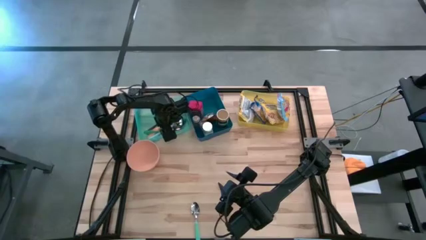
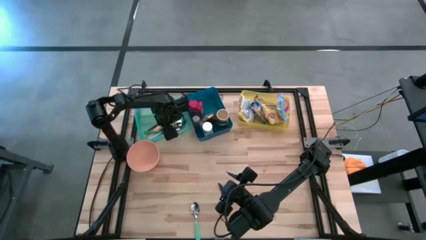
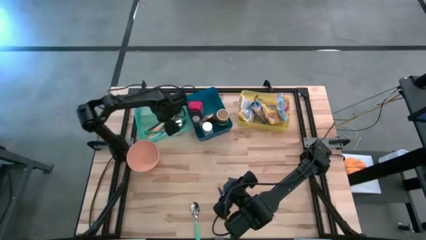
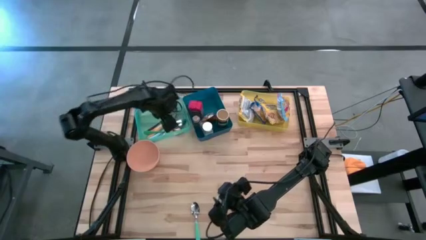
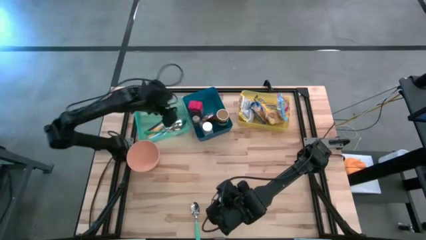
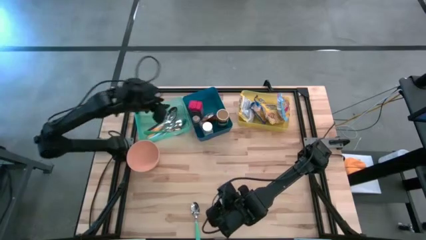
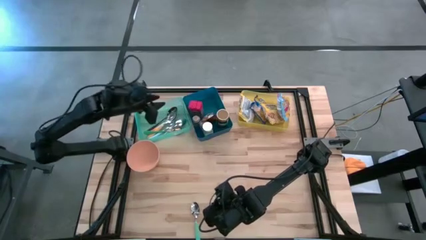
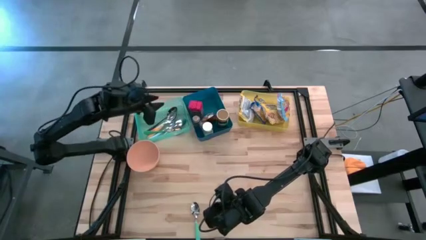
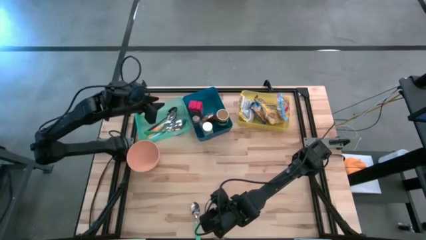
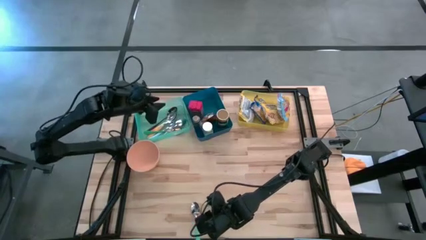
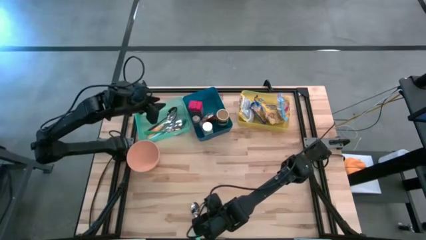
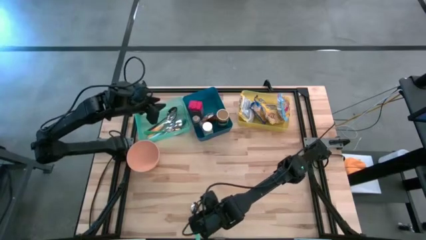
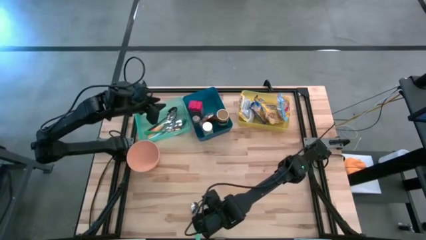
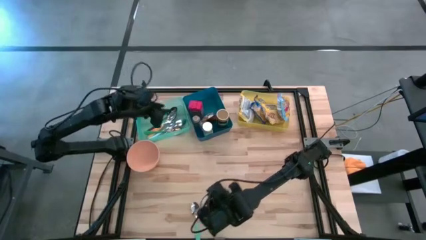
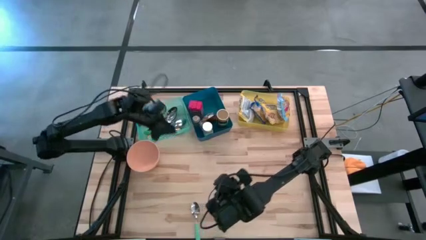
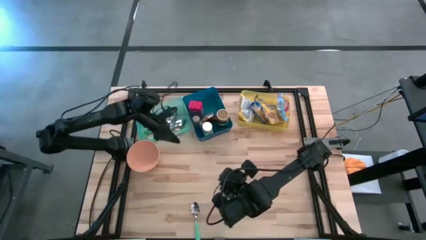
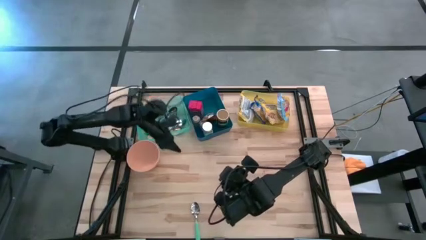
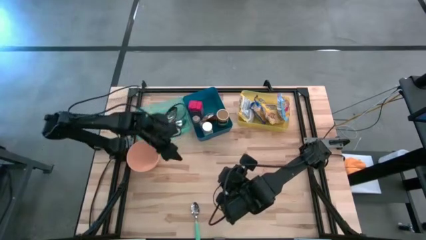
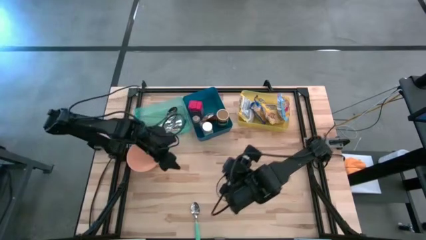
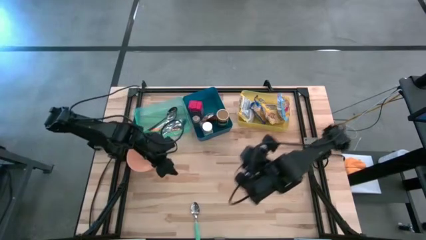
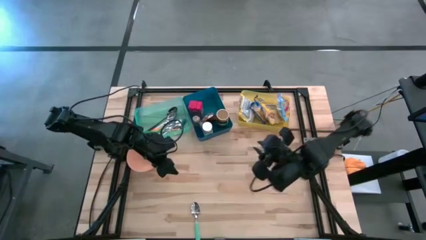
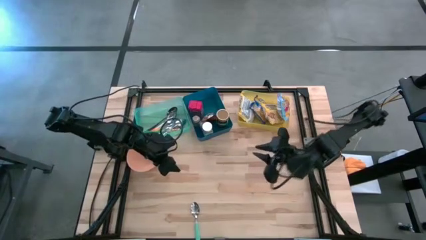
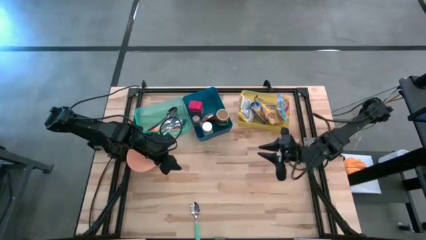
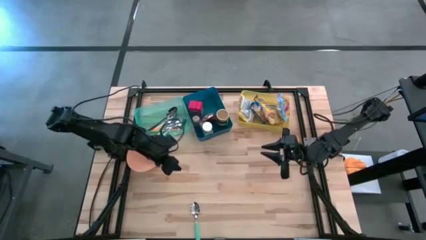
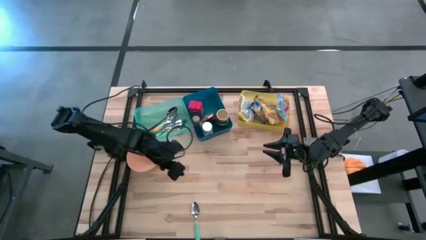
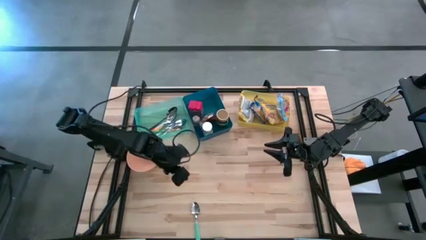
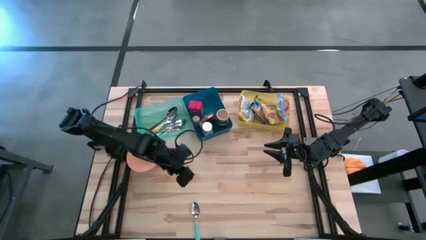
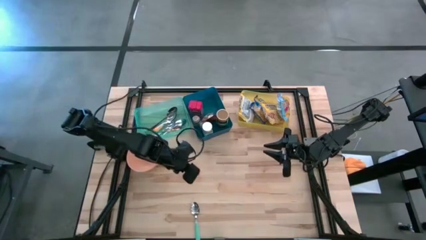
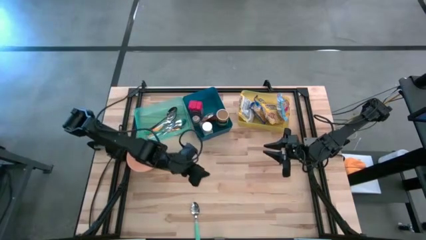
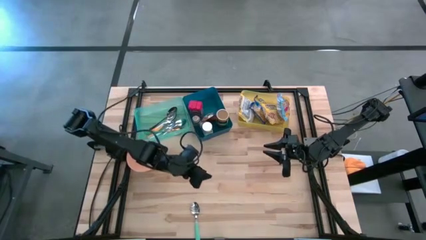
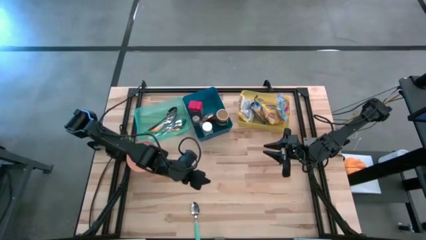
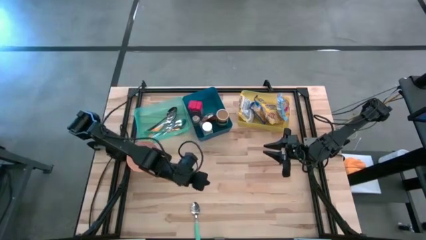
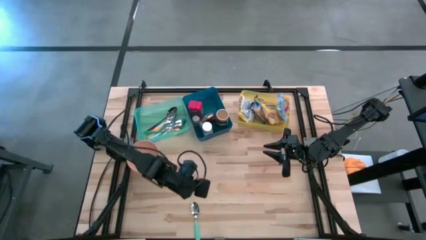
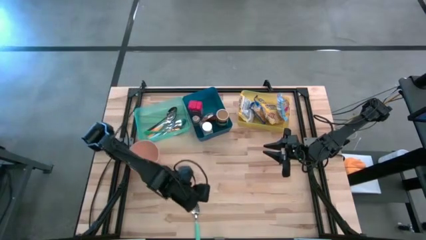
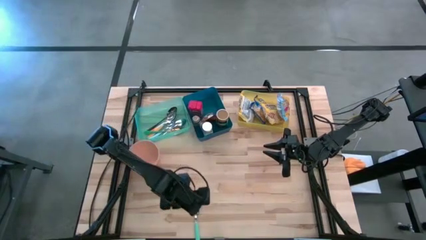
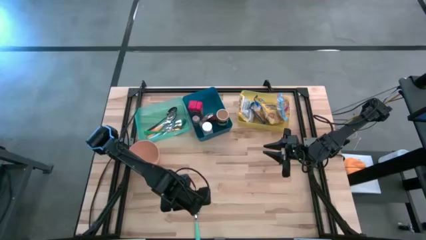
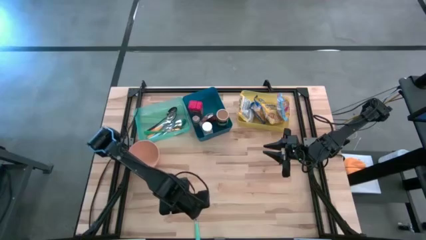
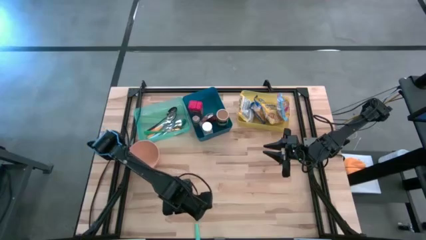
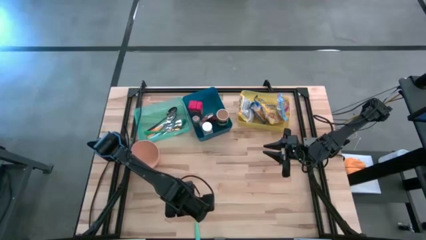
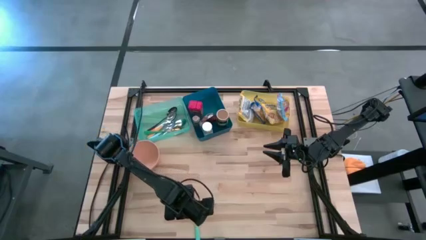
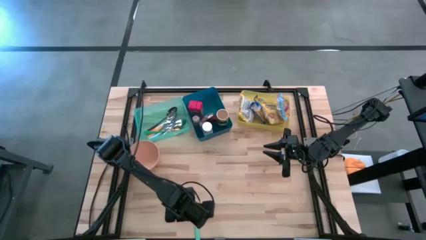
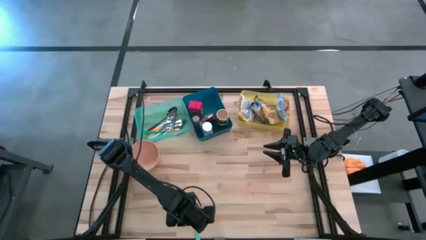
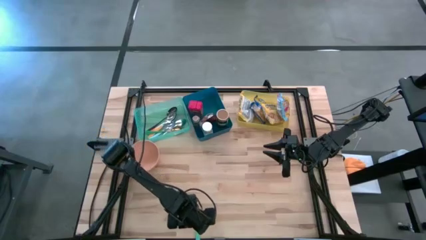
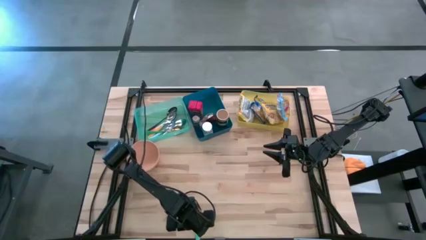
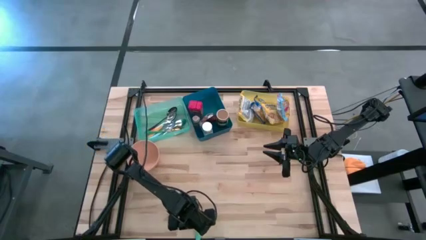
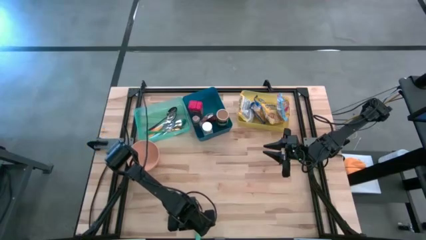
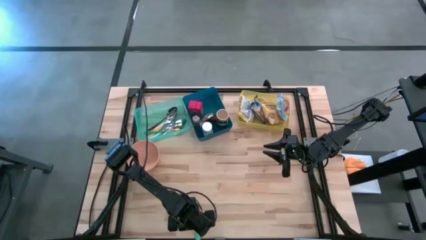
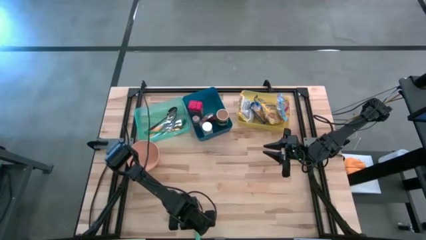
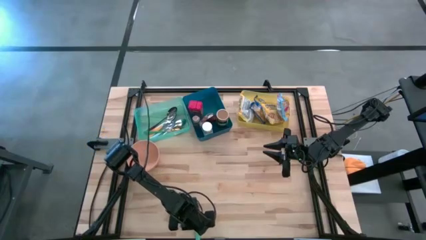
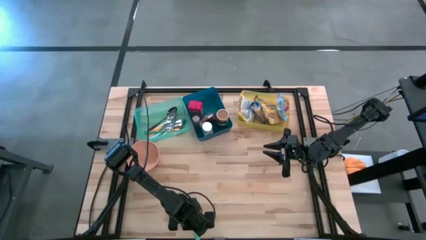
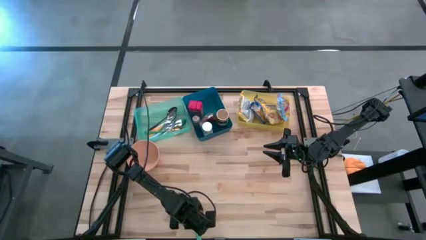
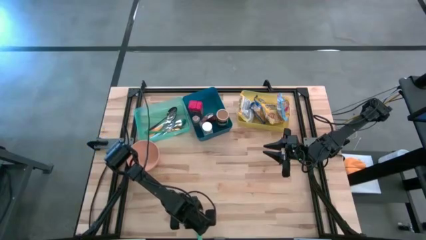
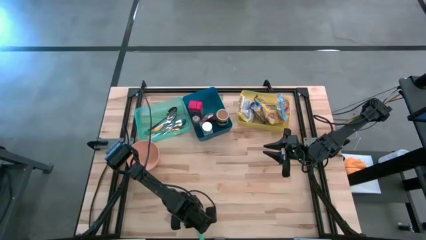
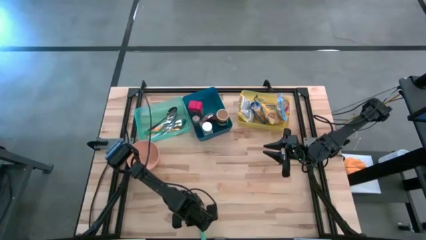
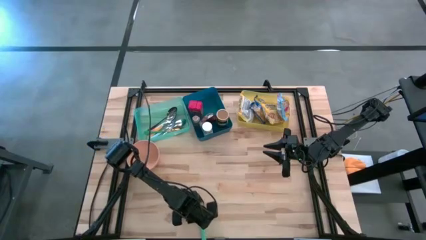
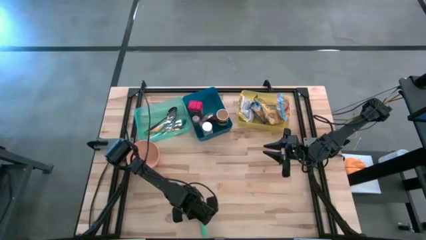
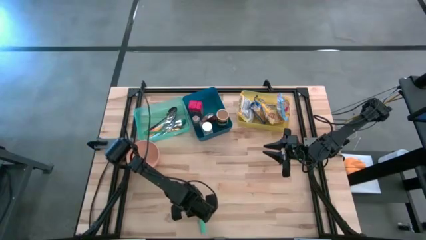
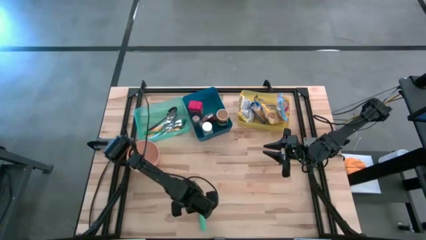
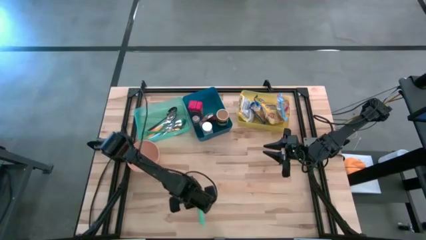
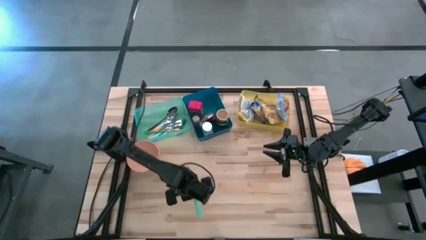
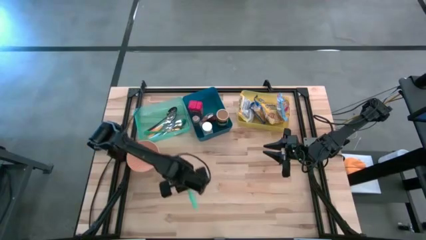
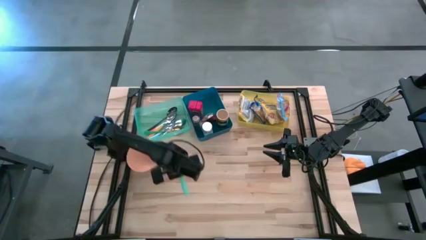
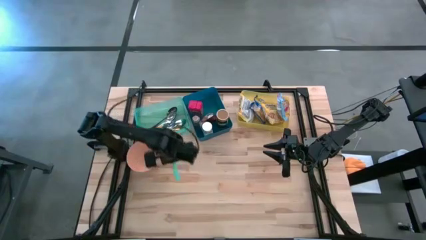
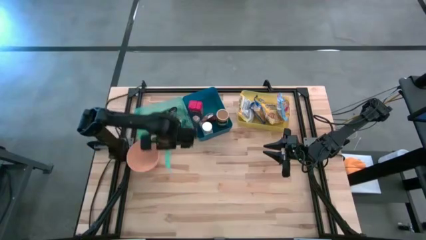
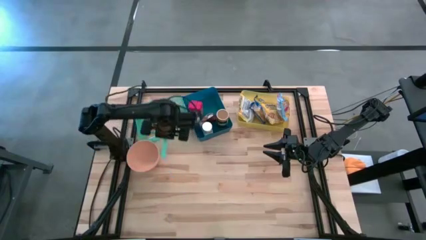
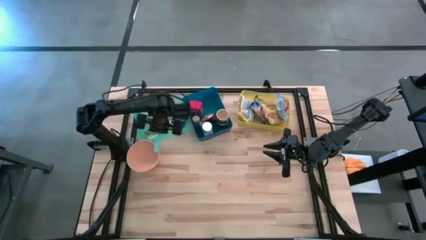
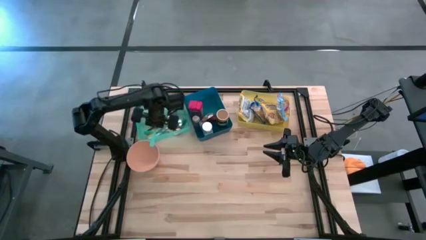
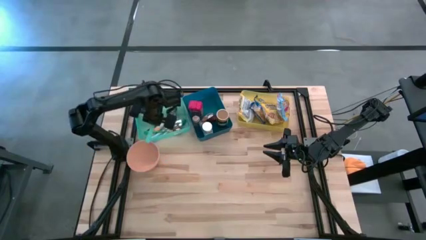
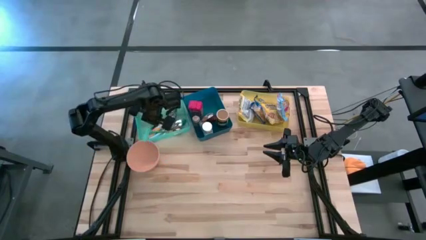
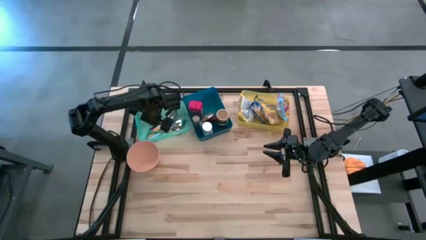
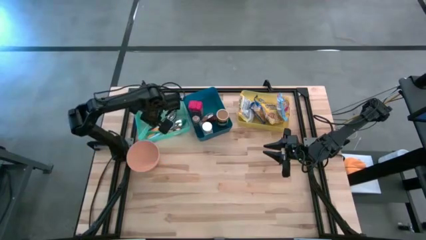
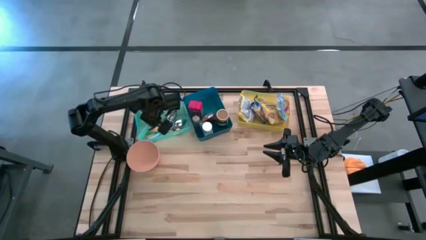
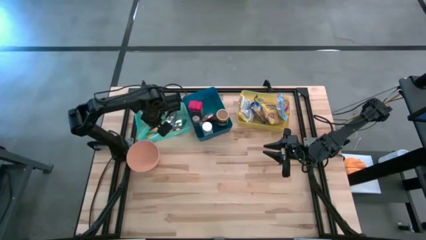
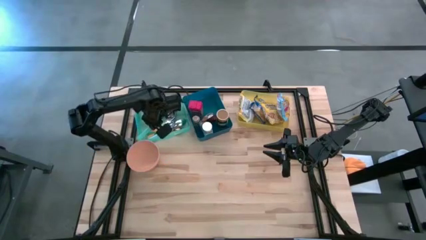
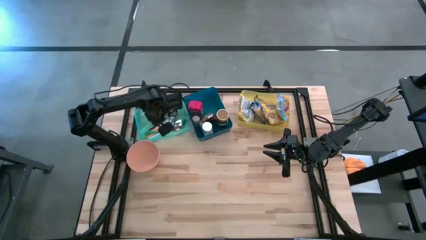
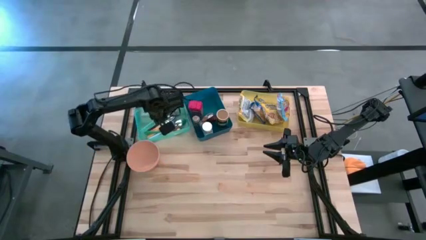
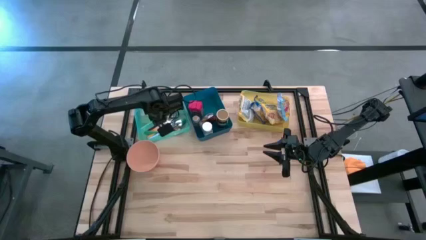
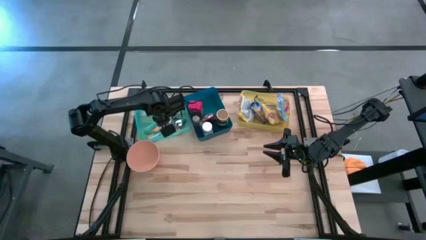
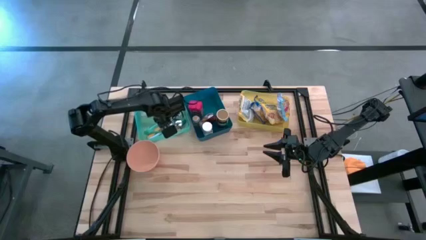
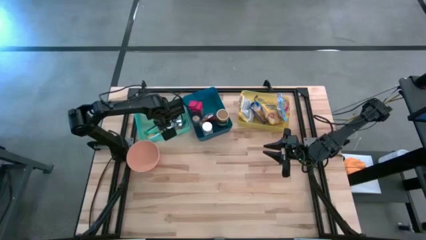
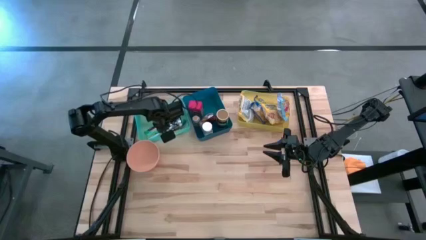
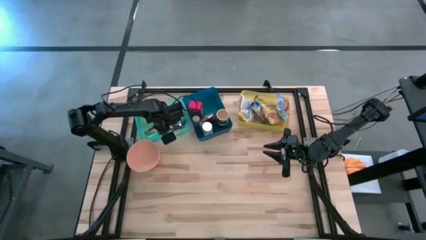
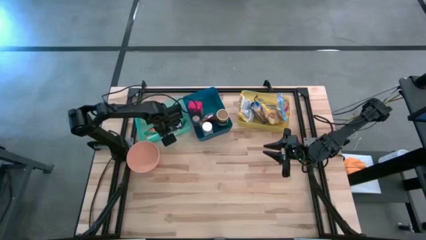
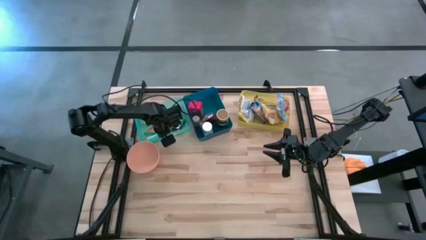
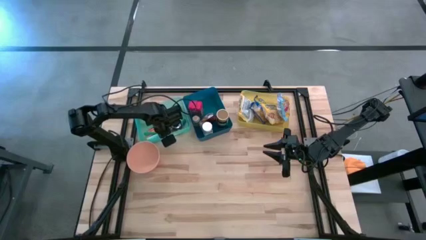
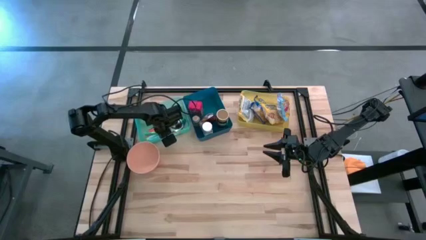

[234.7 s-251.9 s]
Put the green spoon into the green bin
